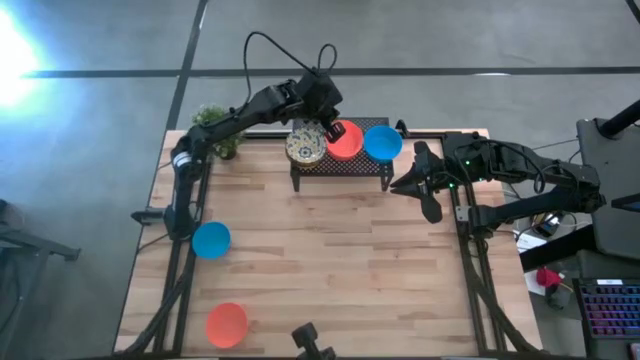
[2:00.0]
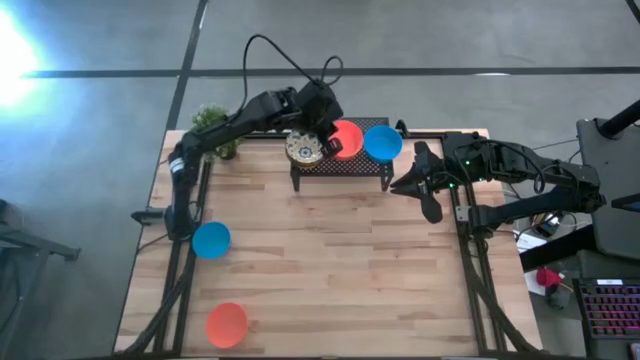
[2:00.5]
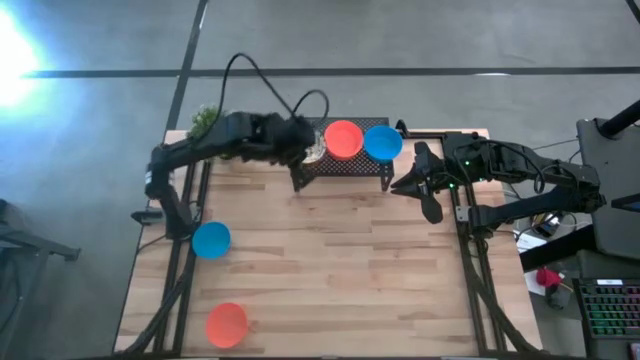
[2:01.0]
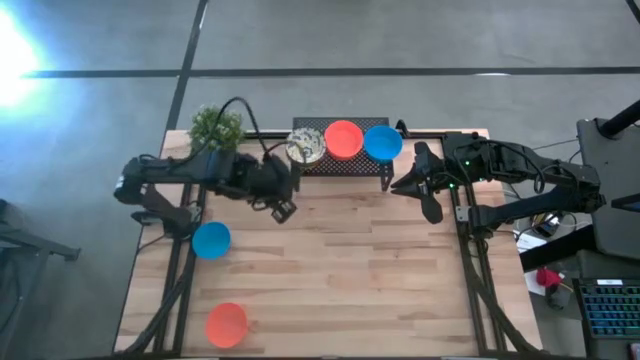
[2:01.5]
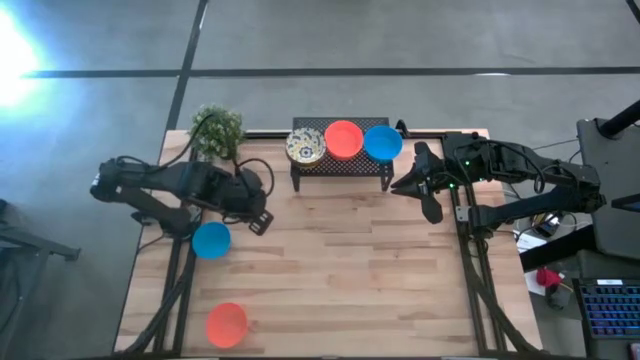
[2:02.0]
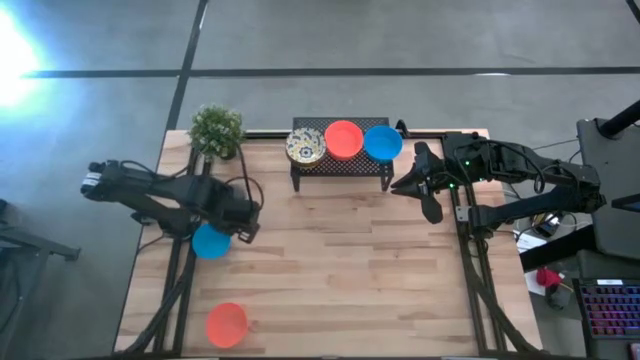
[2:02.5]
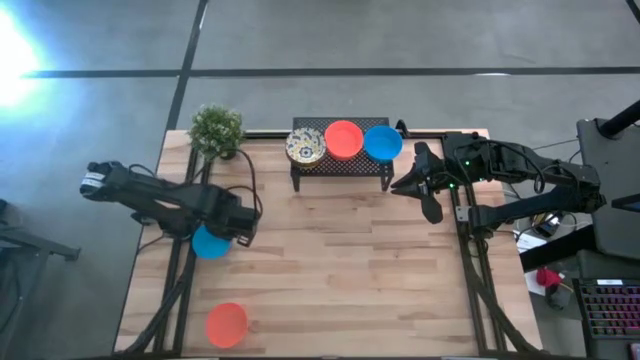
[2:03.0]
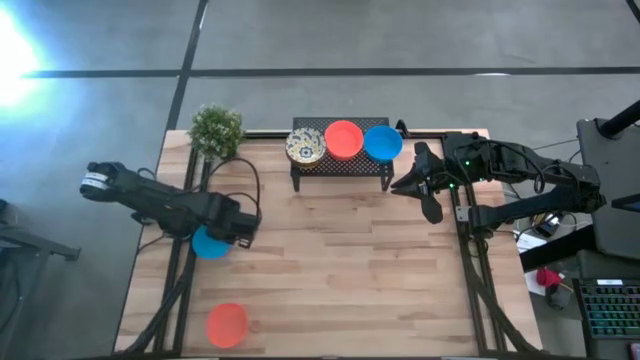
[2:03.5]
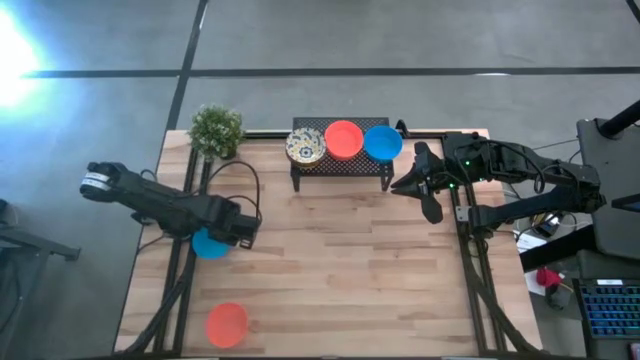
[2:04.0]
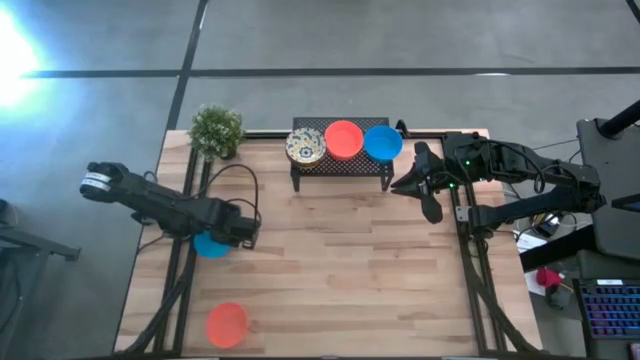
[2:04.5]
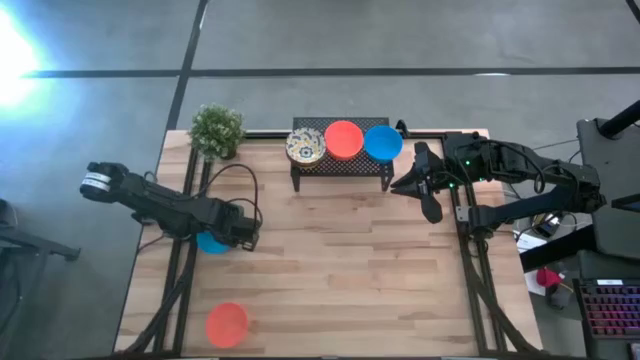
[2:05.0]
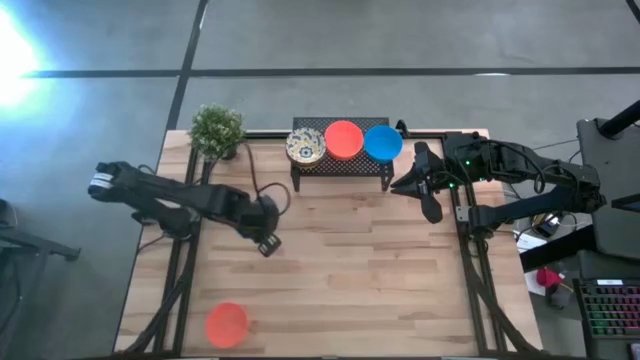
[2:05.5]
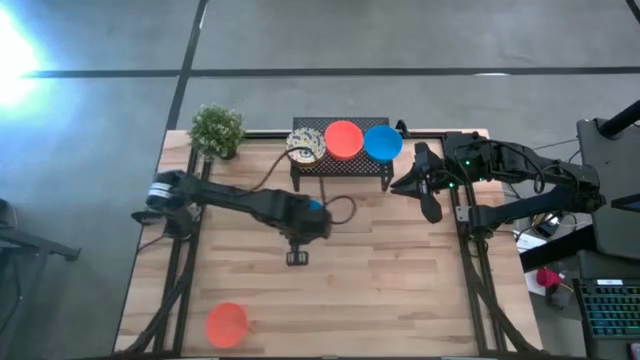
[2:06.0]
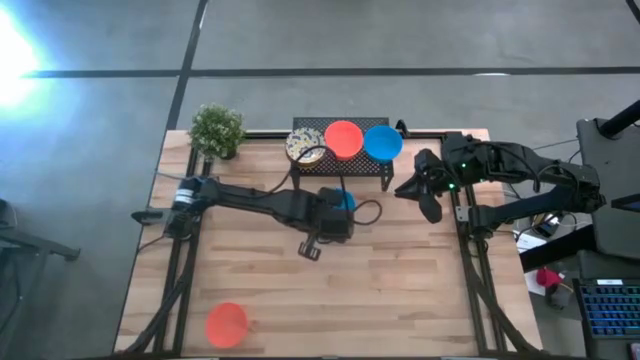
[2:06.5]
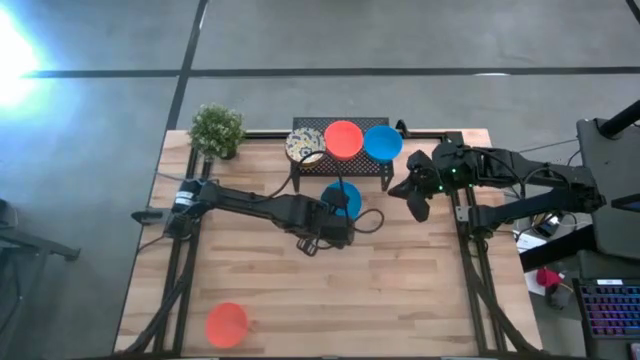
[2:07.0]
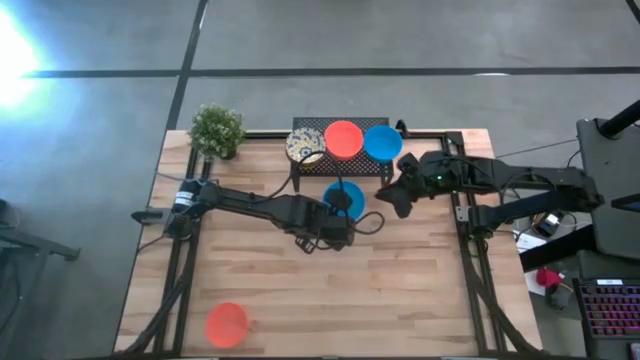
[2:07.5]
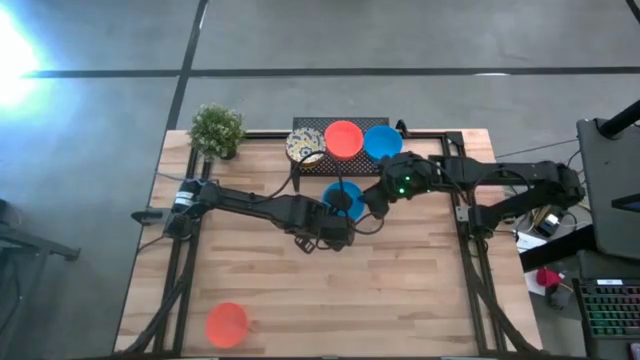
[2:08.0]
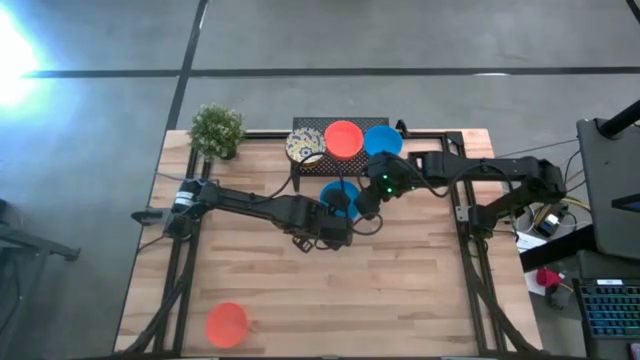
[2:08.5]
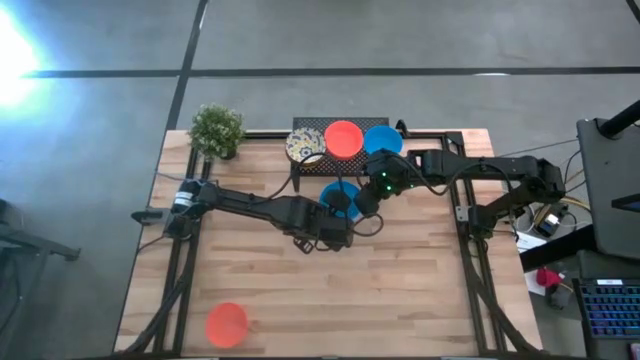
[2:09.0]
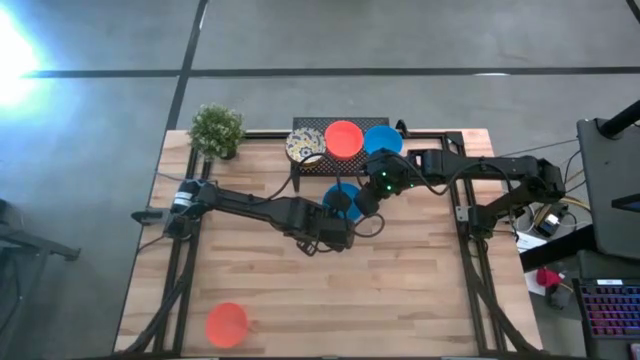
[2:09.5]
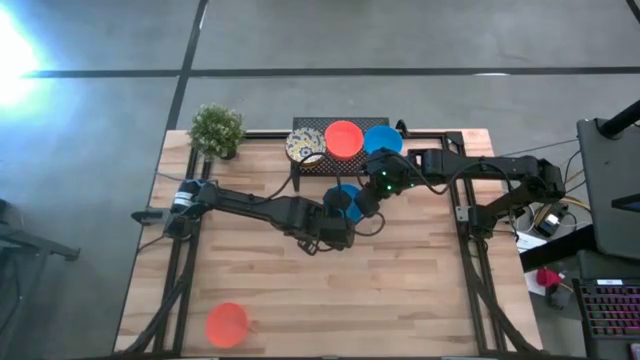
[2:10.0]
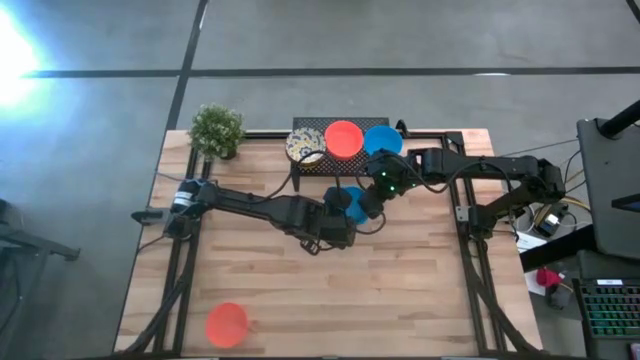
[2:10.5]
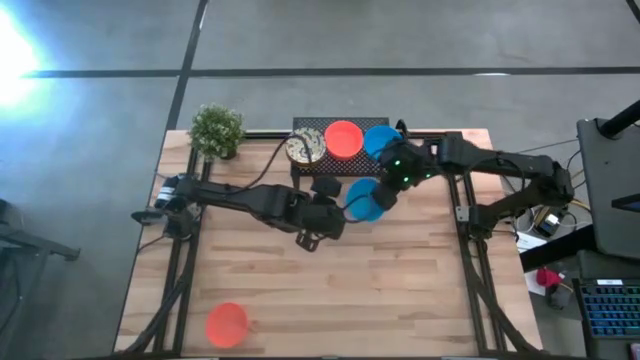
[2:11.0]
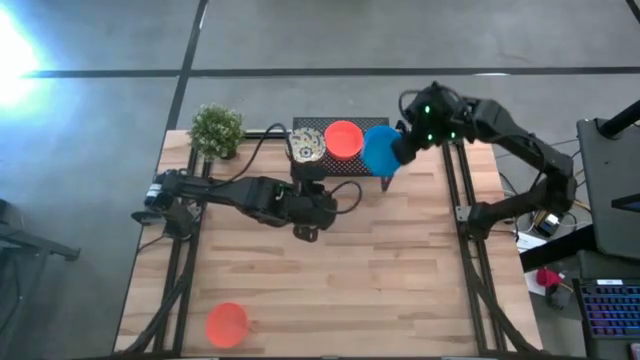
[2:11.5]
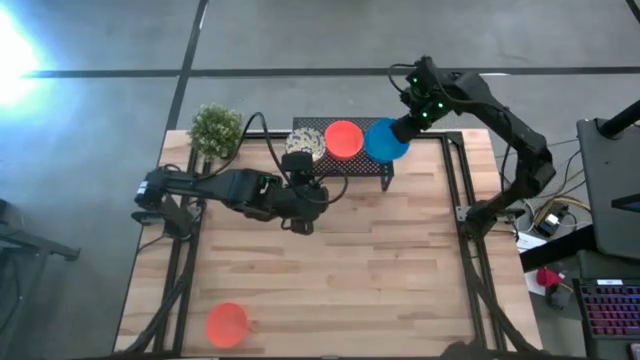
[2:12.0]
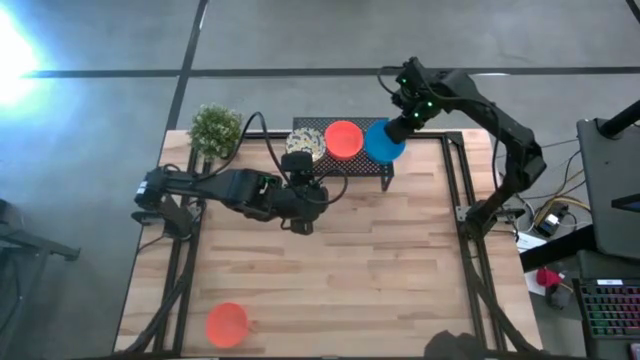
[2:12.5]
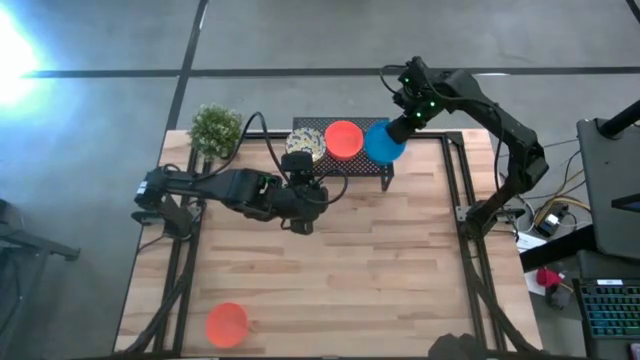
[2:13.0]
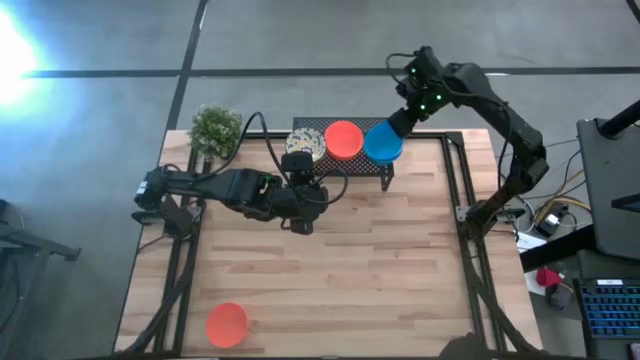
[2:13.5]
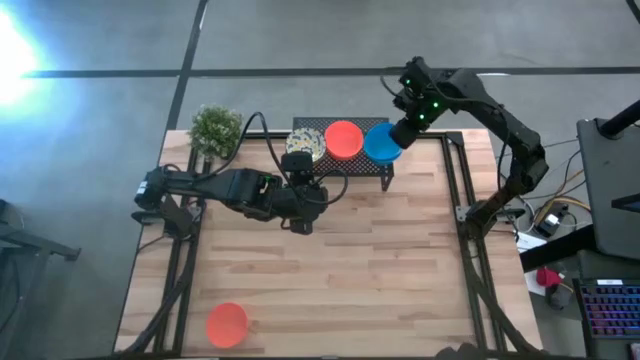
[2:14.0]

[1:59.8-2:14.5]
Task: Pick & Place Mini bowls
Stack the blue bowl on the blue bowl on the shelf

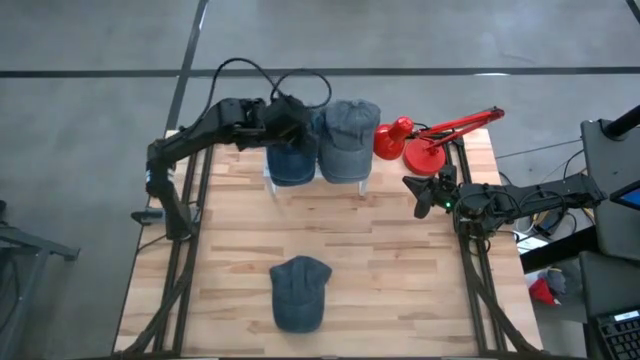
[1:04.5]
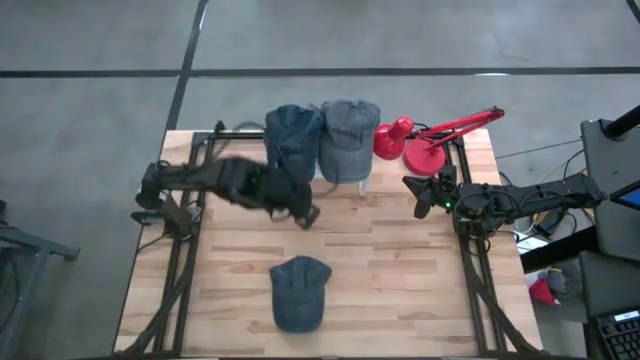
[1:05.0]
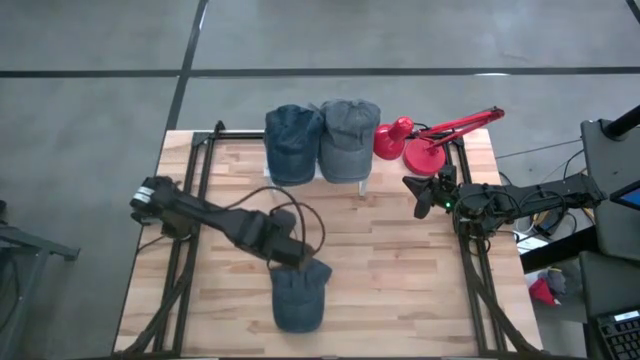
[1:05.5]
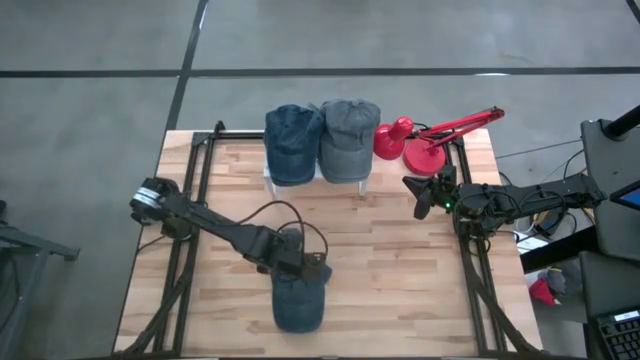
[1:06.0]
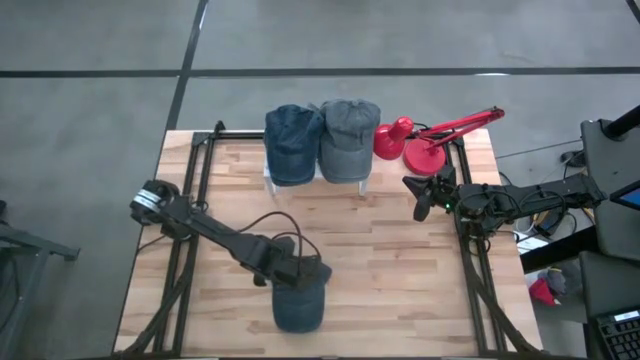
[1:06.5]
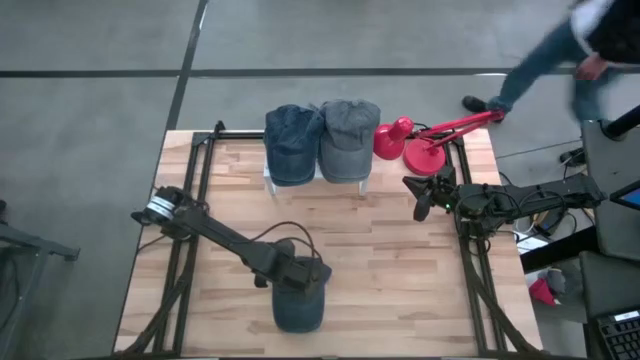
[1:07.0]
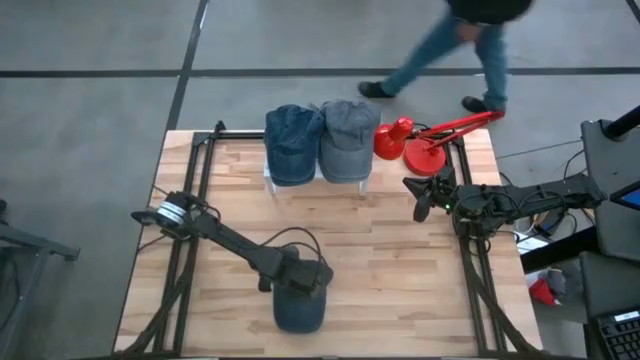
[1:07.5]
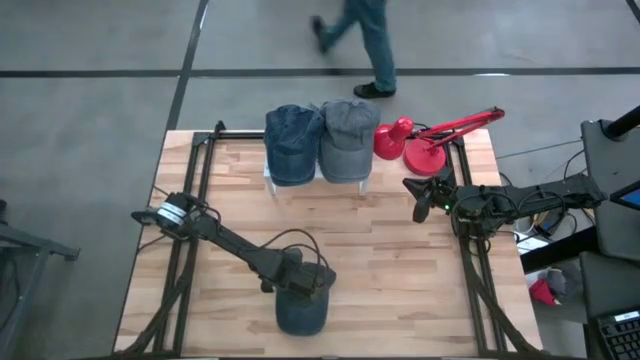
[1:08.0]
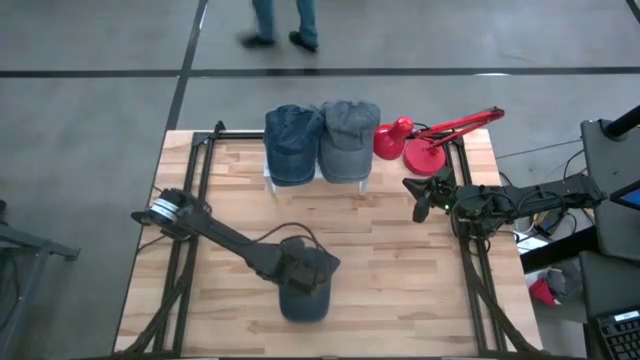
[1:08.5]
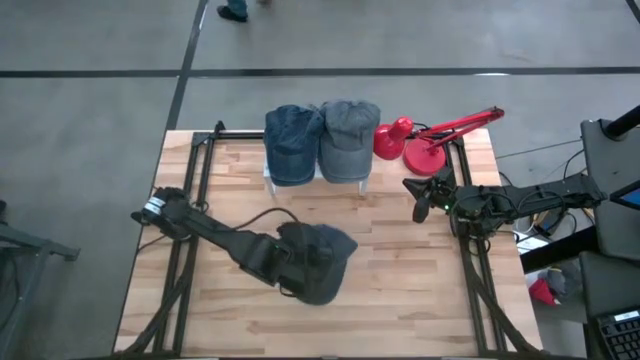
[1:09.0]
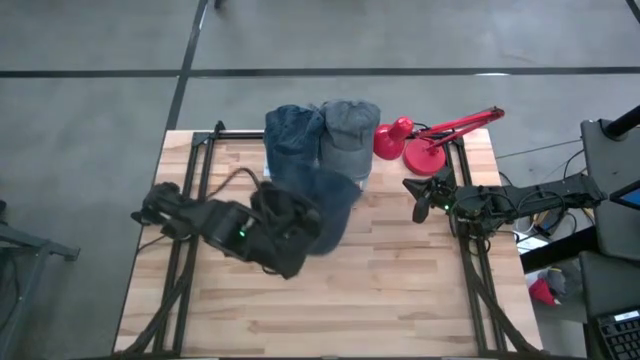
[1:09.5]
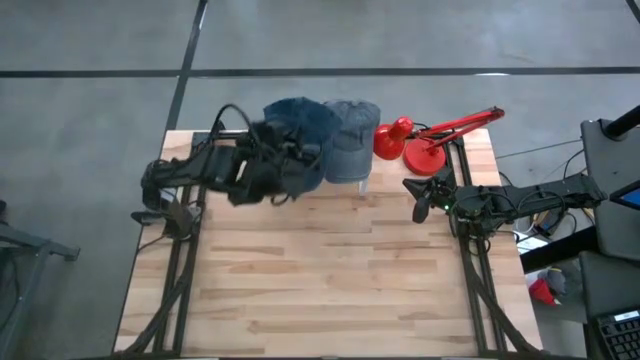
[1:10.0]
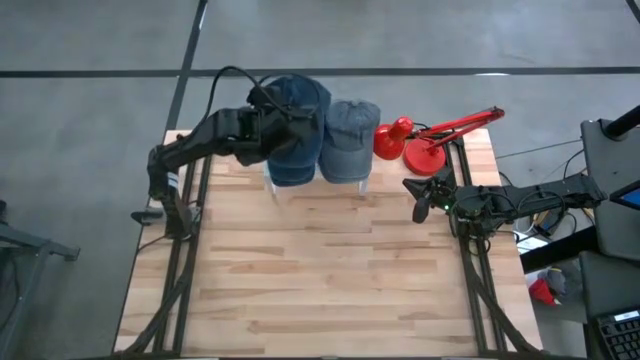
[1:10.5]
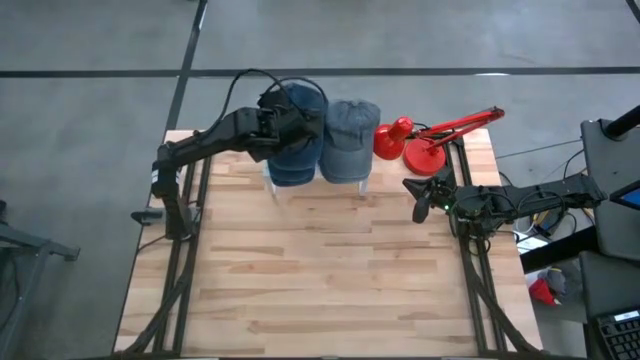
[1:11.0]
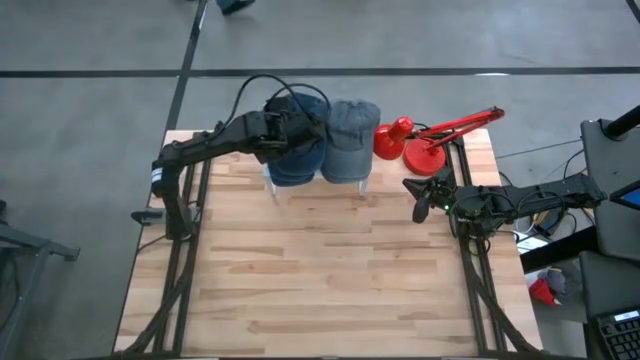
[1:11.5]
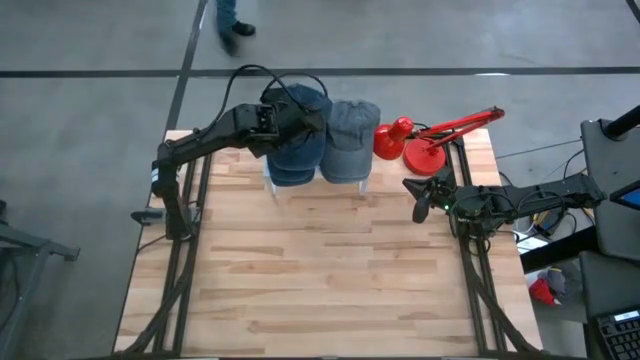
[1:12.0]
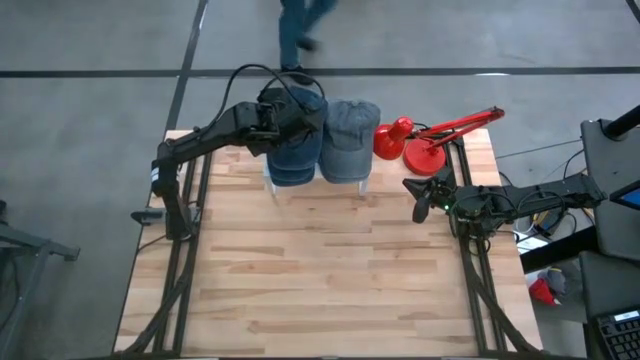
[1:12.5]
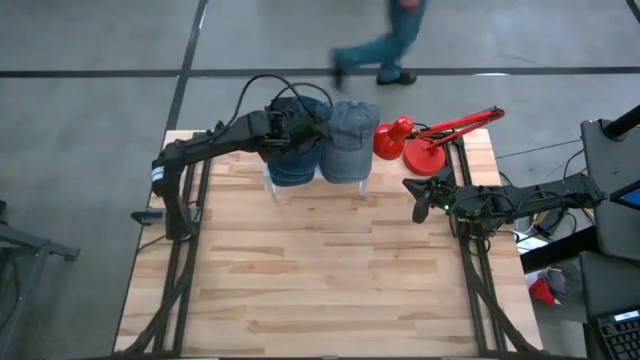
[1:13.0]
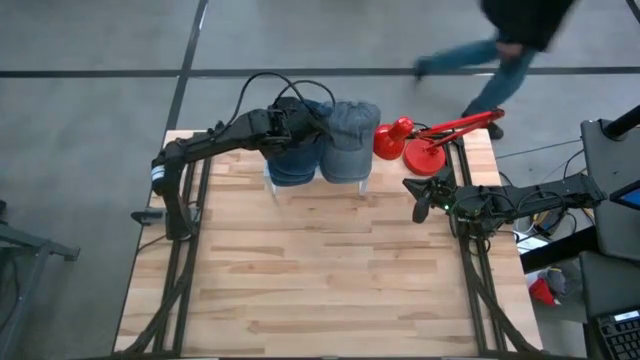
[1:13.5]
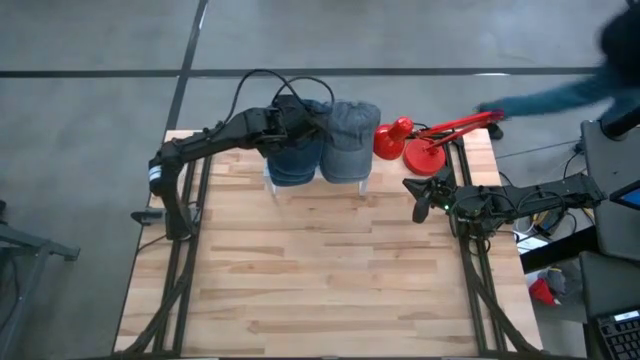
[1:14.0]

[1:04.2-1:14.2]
Task: Stack small to large cups/mugs on shelf
Stack the blue cup on the other blue cup on the shelf
